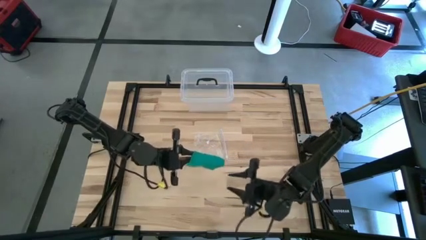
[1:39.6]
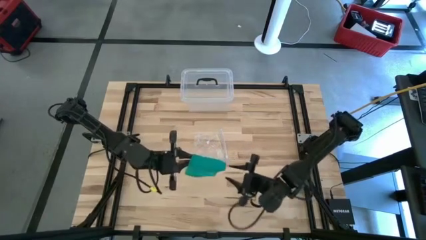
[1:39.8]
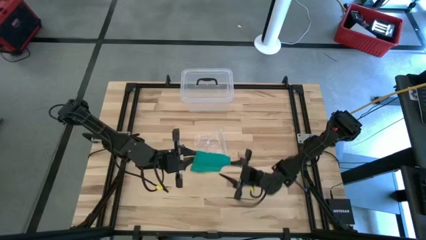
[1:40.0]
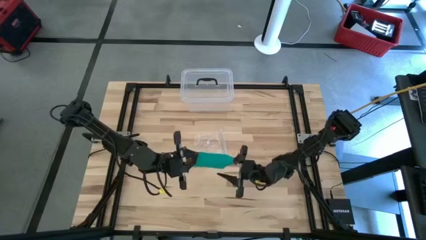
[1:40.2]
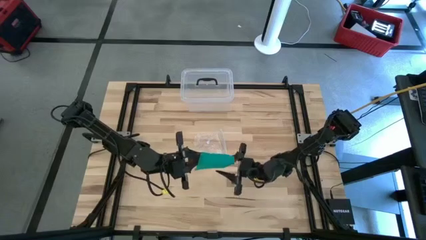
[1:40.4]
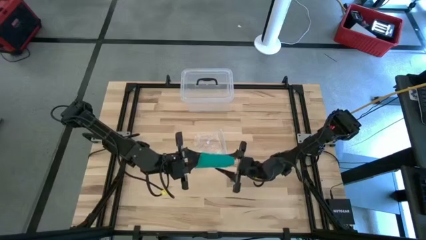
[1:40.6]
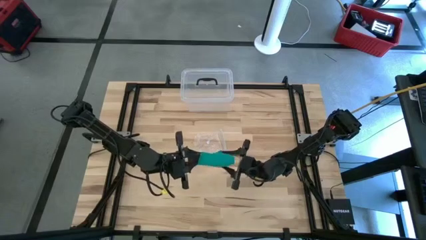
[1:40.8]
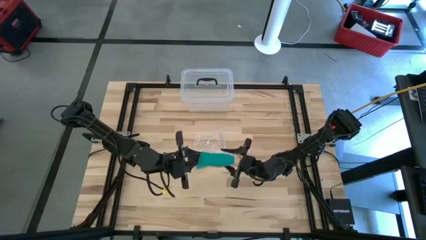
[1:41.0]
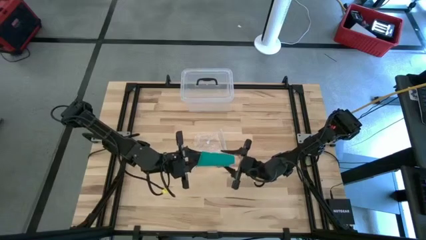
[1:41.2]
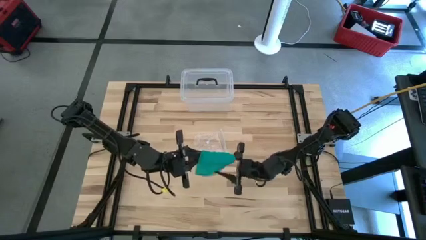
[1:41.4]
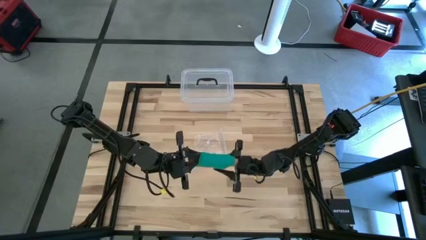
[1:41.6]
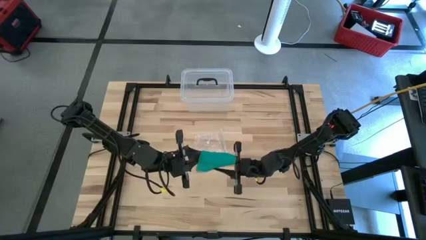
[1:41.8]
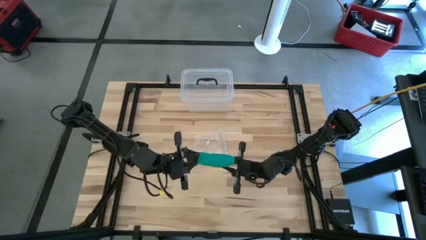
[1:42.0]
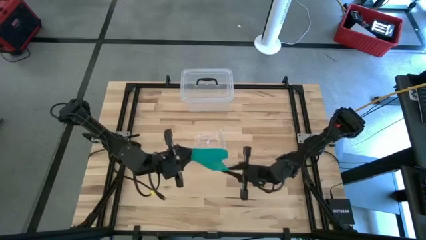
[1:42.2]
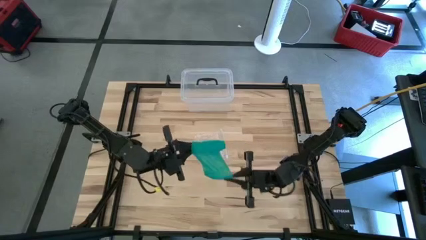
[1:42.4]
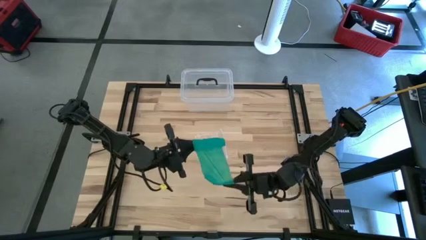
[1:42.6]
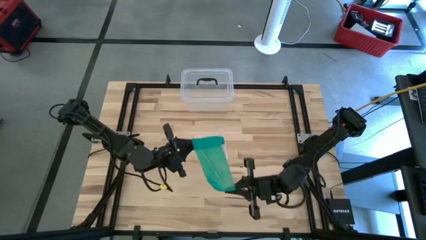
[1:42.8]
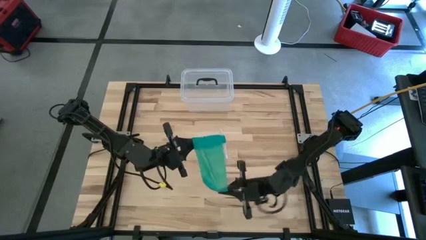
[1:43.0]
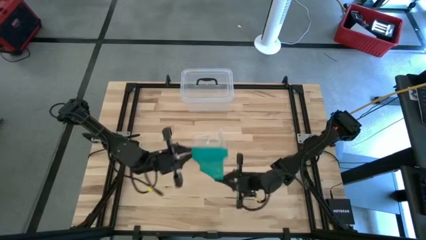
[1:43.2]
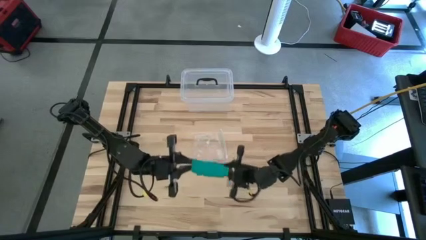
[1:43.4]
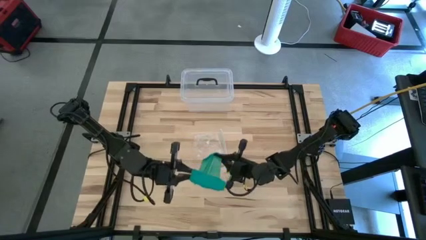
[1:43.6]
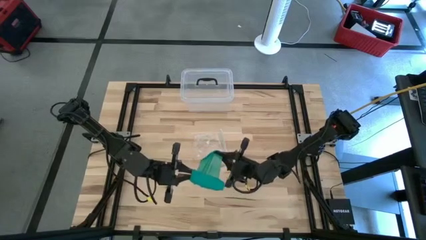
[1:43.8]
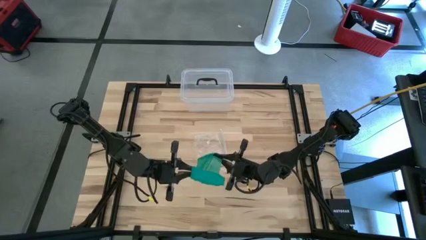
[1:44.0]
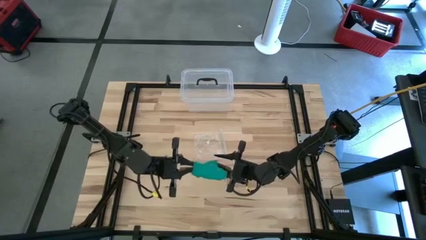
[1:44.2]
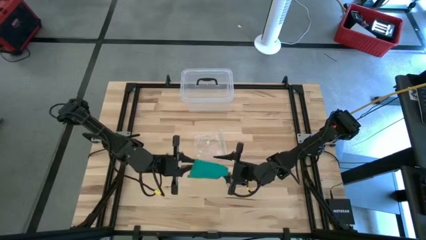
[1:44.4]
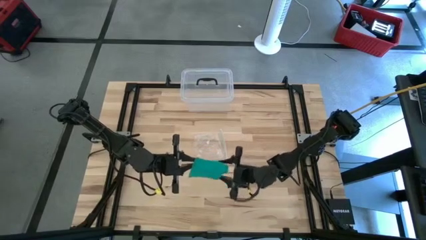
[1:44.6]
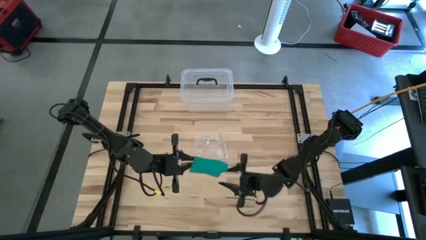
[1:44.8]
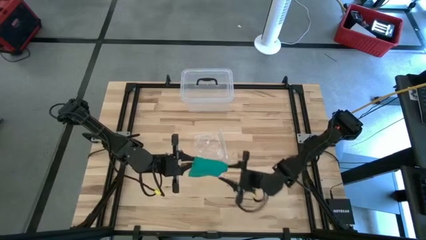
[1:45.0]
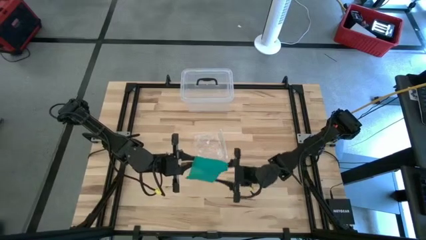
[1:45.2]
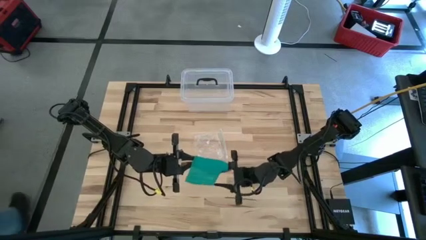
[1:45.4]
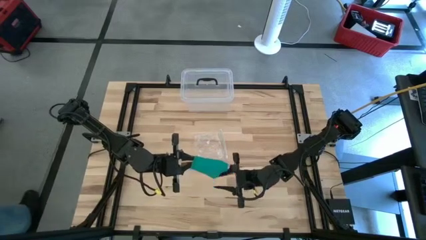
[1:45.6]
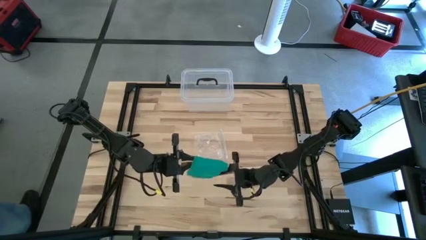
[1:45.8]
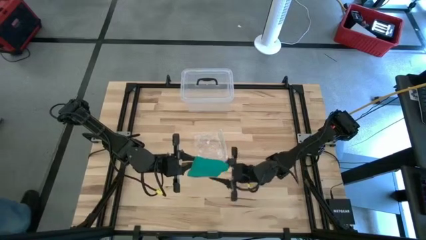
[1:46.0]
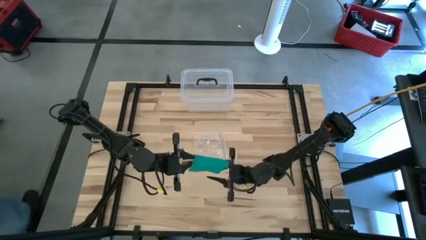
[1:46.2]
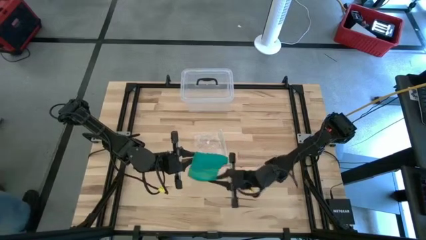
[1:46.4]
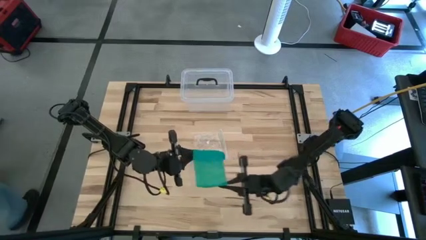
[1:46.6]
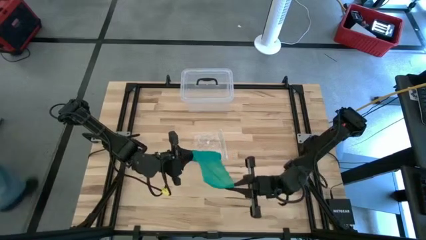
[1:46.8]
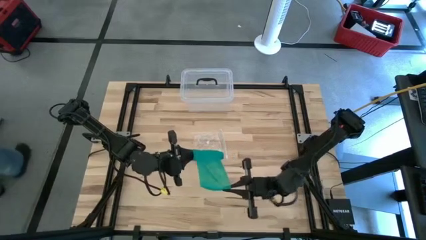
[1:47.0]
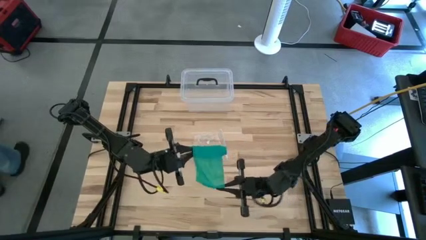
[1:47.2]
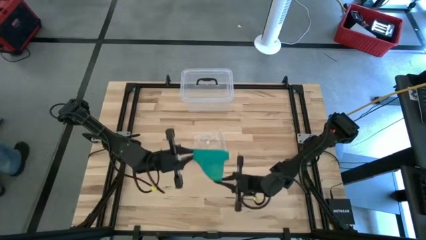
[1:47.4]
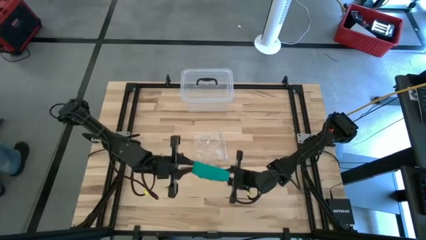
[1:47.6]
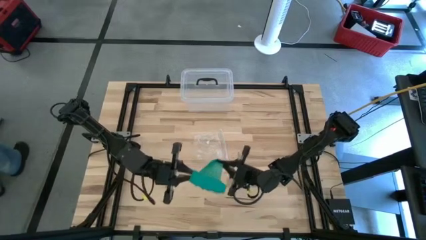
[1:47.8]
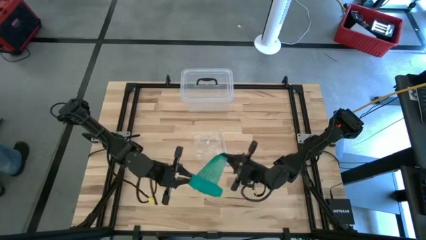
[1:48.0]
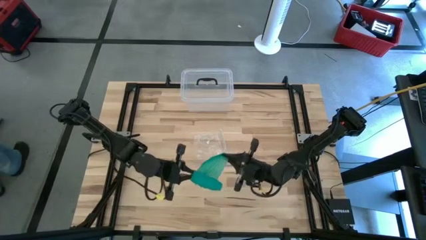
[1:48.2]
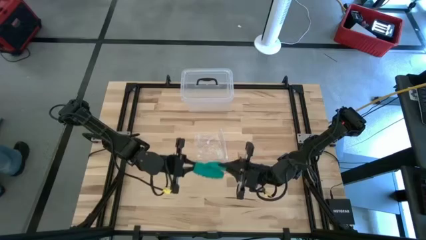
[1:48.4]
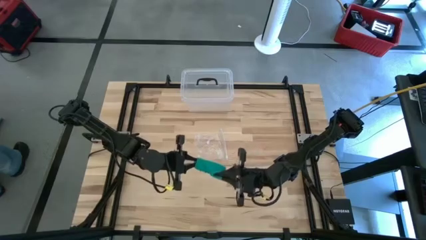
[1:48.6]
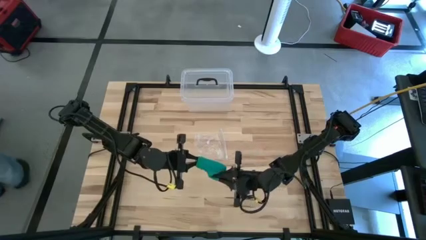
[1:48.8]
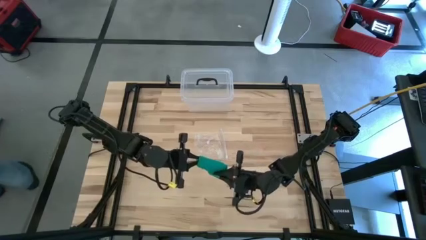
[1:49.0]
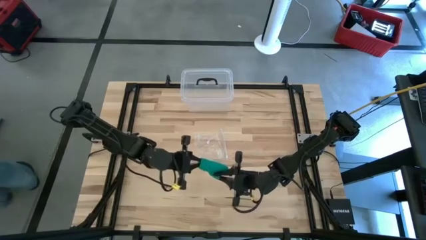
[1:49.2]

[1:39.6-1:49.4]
Task: Roll bandage
Roll the green bandage

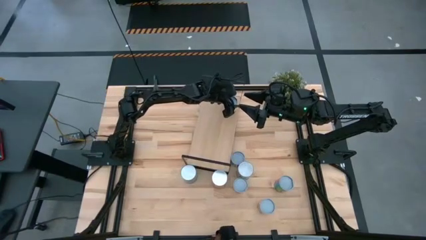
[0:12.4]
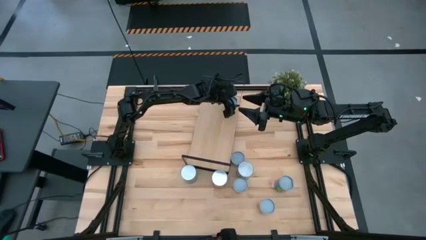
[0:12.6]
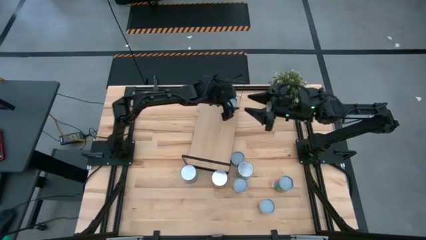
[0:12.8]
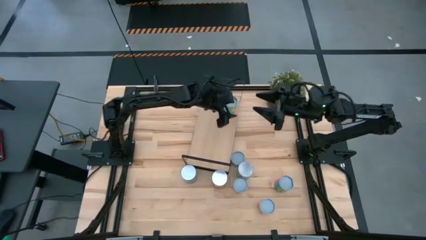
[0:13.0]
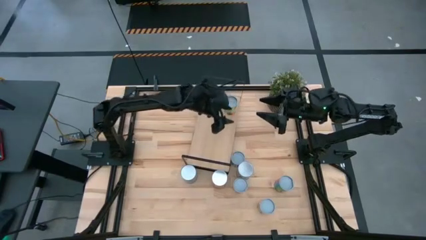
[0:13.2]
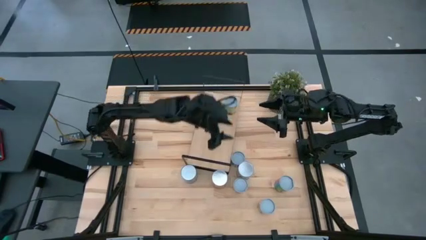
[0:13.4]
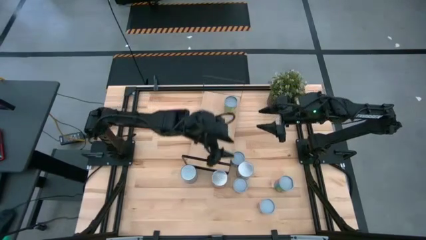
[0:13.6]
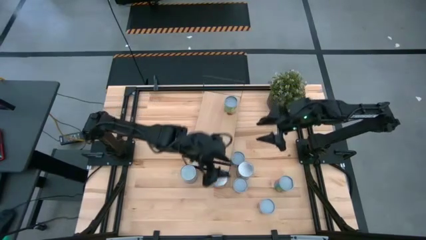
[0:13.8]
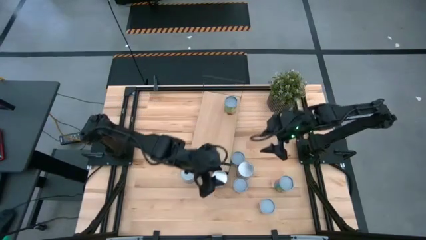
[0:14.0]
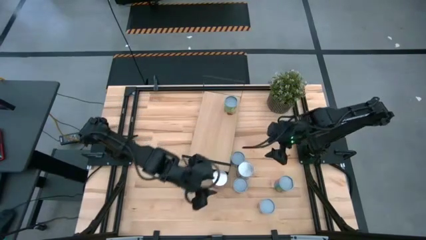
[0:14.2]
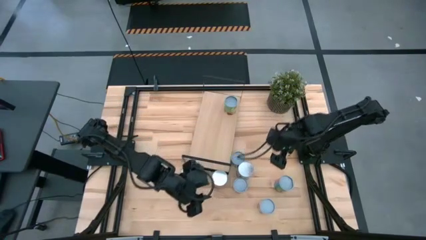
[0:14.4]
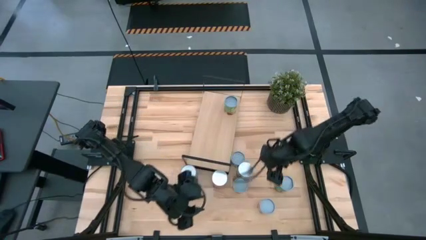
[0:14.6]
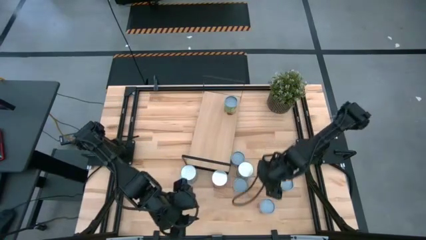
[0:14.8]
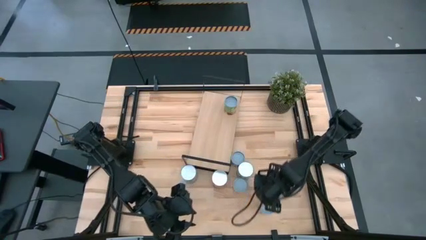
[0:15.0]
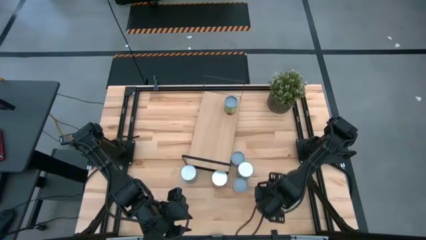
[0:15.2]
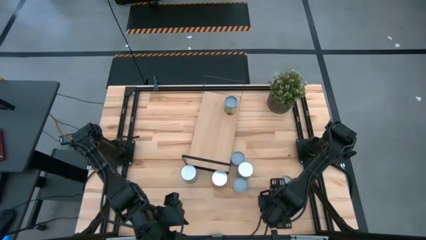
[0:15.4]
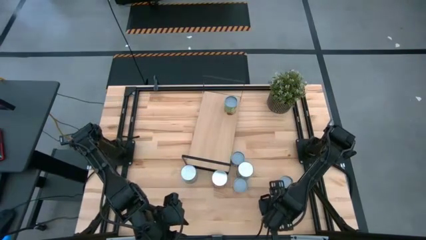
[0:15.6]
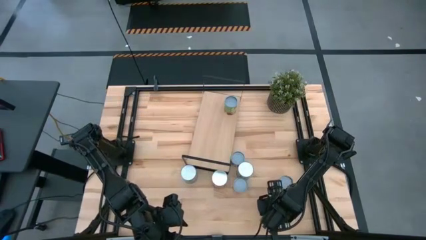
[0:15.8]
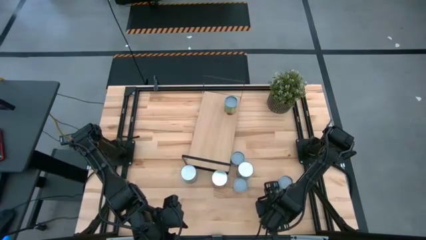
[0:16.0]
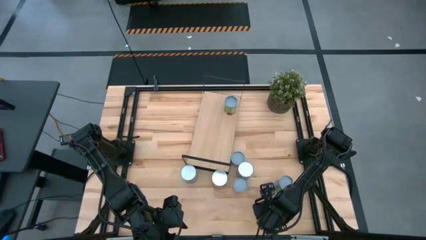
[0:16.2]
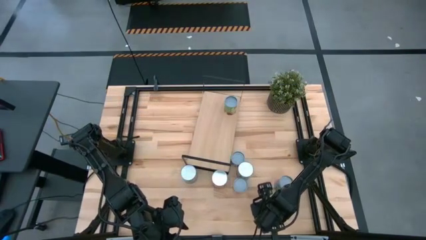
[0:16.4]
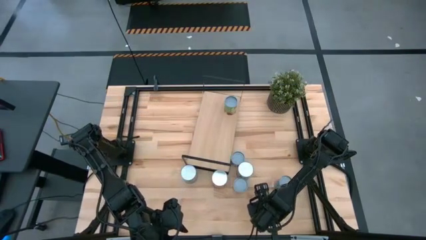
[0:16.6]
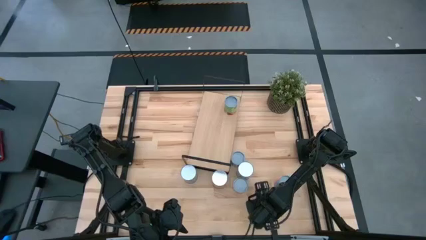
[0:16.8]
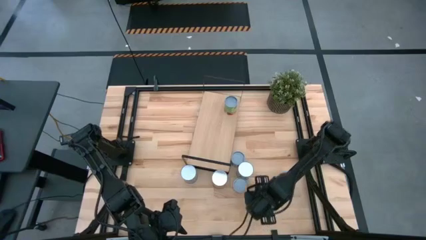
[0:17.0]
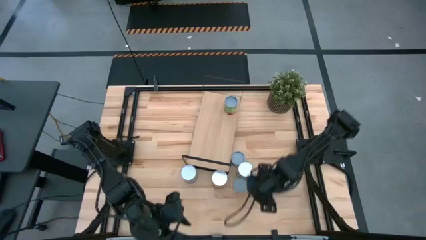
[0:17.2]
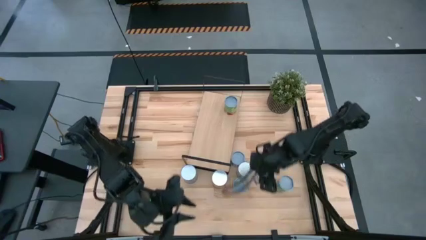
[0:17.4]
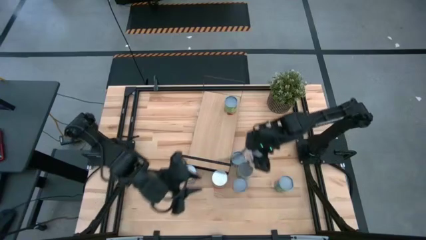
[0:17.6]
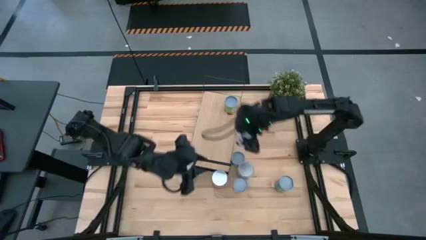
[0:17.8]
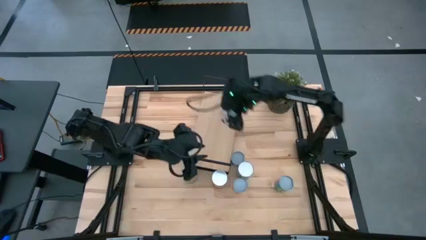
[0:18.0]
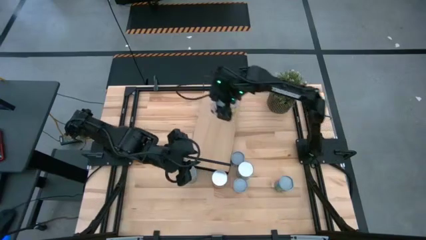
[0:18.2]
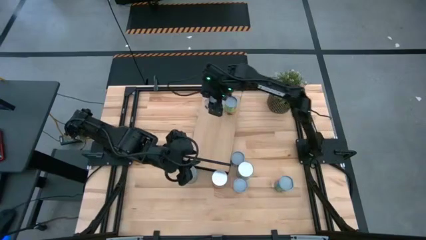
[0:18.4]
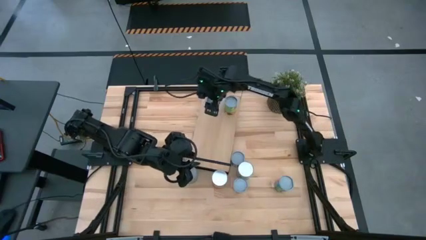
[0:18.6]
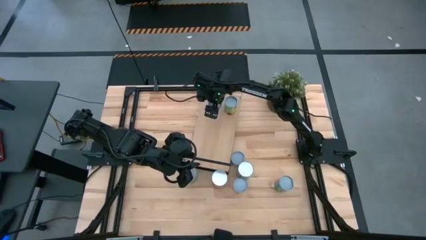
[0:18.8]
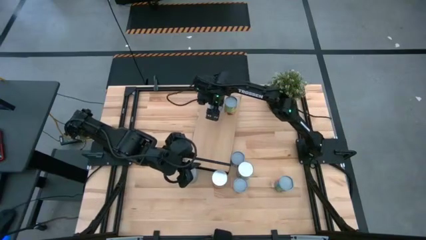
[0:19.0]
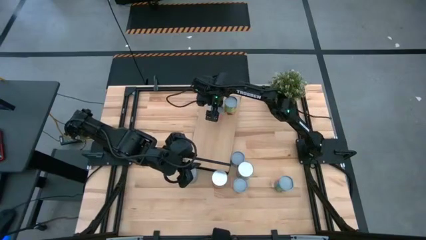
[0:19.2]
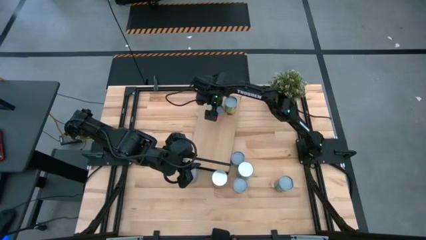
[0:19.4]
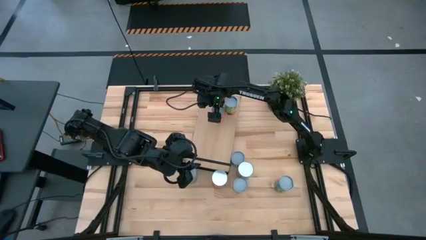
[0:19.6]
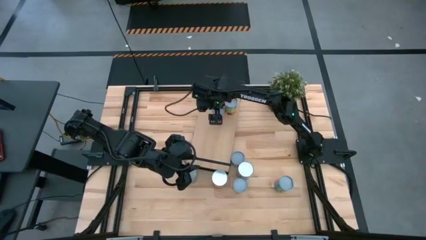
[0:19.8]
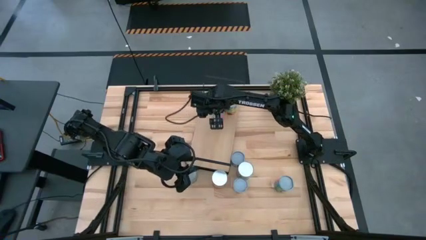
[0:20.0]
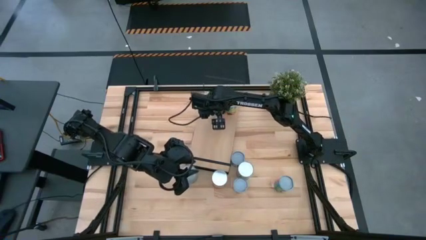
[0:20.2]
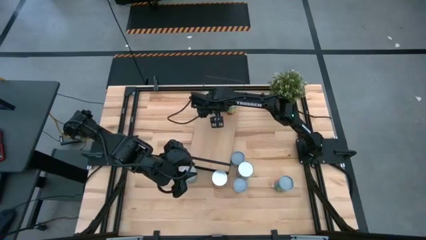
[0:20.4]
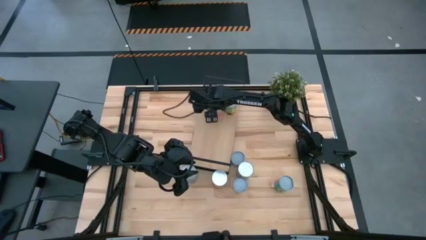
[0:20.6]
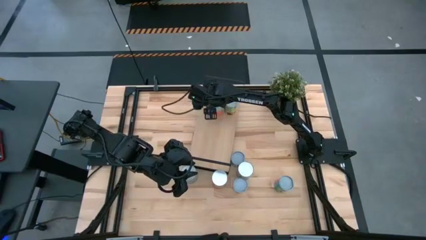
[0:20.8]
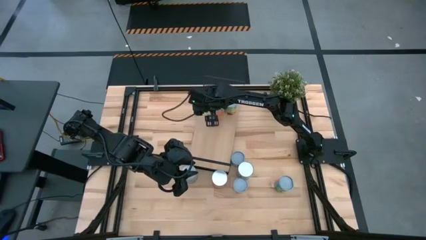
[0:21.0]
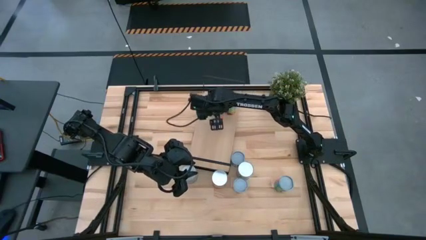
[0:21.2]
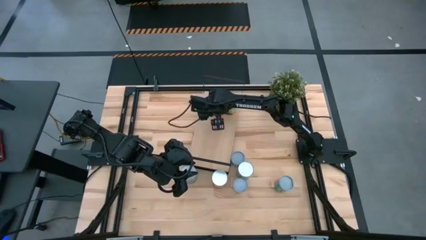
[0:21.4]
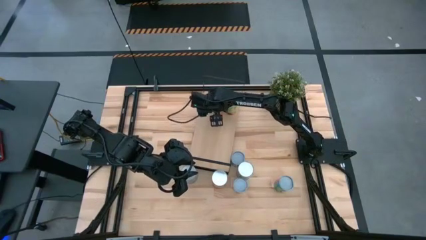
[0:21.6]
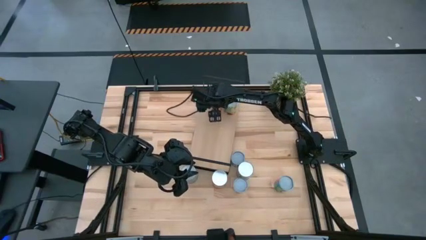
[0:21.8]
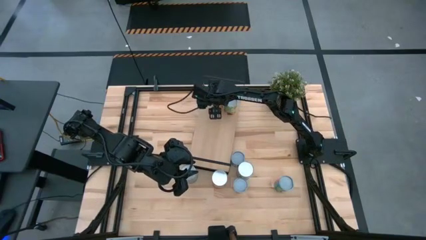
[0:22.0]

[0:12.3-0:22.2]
Task: Pick and place cans onto a shelf
Put the dark orange can on the shelf aligned with the green can
